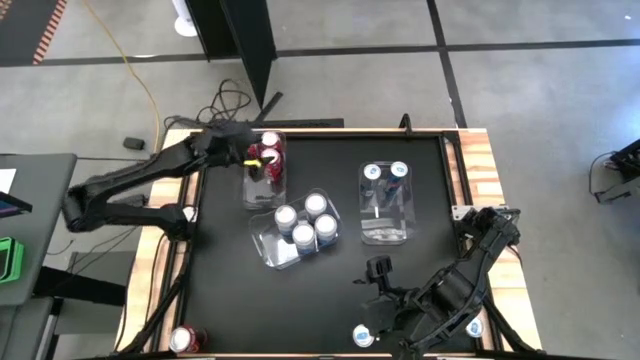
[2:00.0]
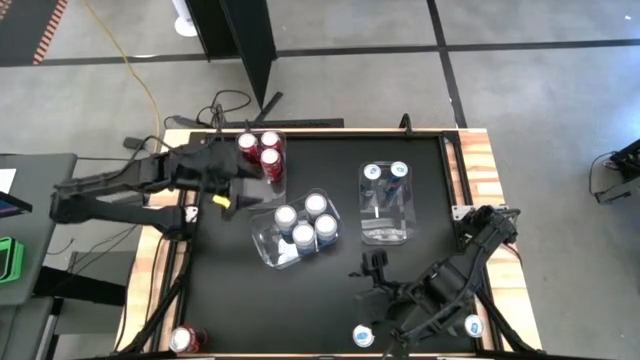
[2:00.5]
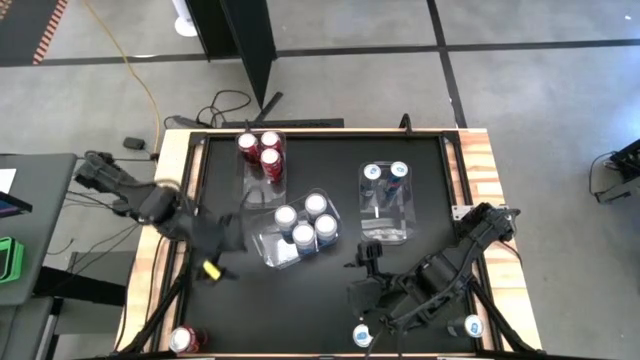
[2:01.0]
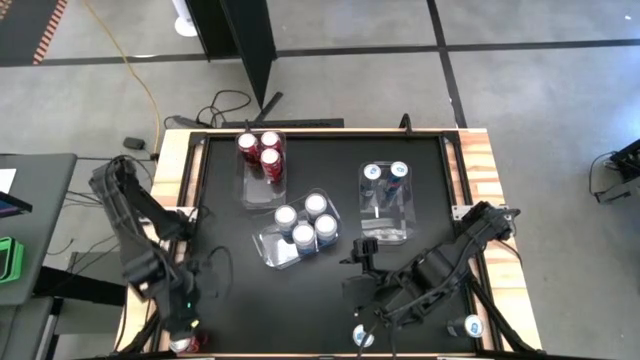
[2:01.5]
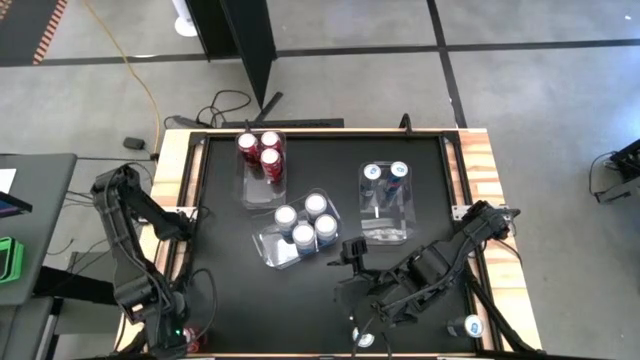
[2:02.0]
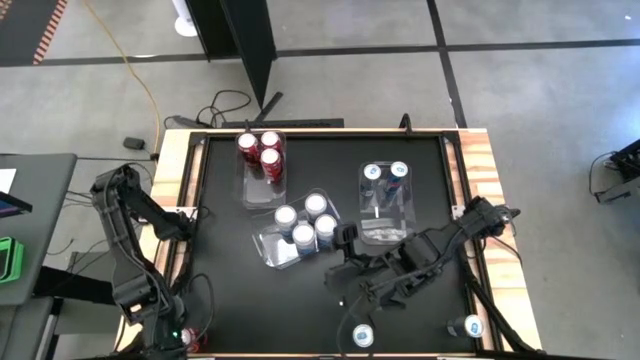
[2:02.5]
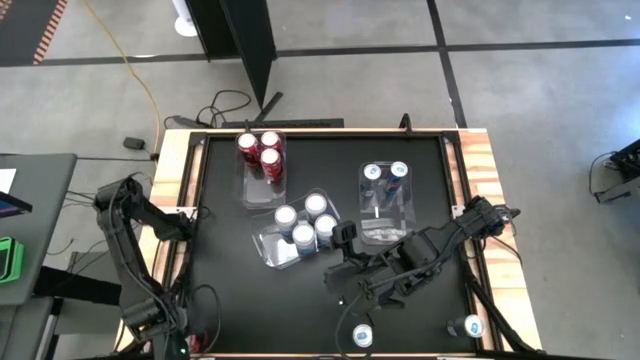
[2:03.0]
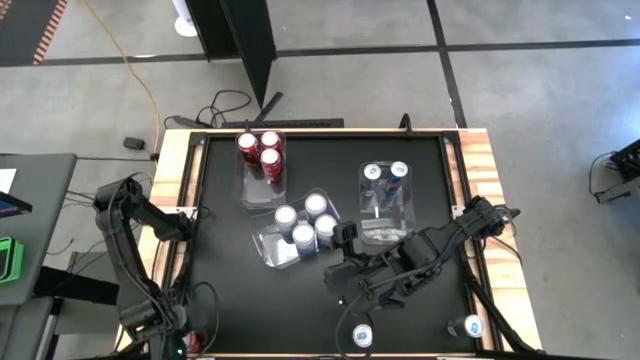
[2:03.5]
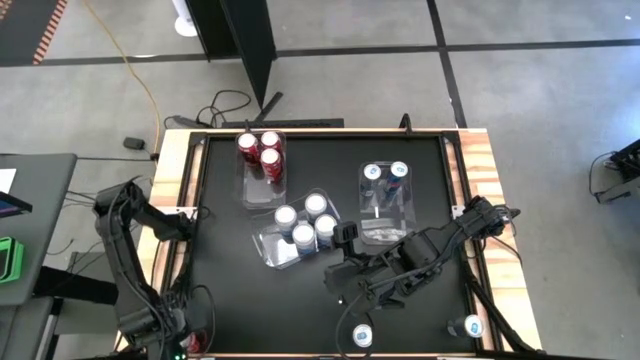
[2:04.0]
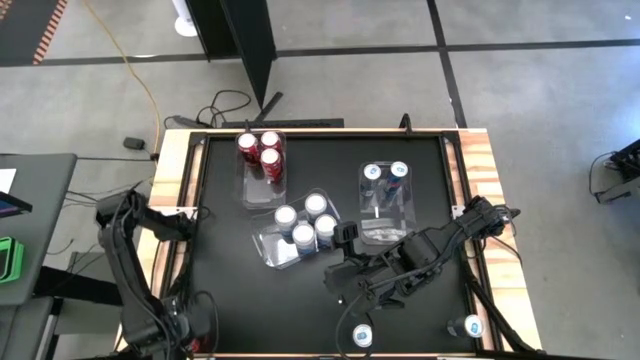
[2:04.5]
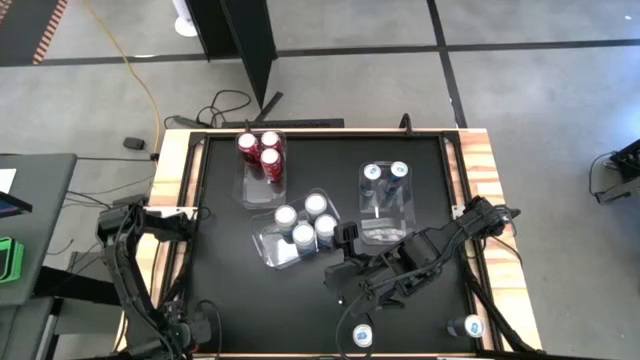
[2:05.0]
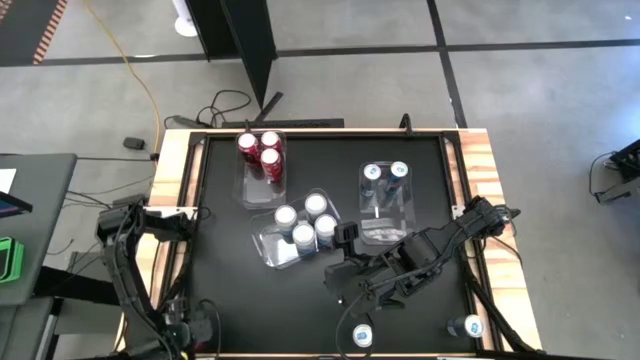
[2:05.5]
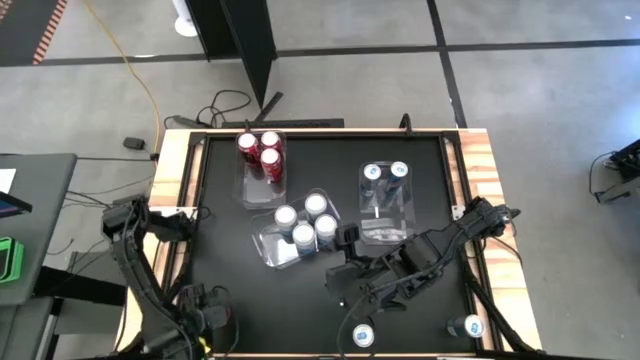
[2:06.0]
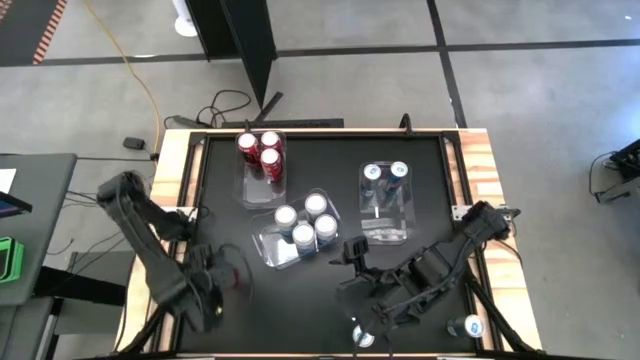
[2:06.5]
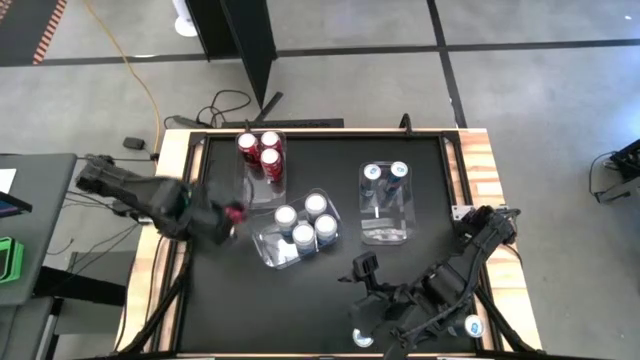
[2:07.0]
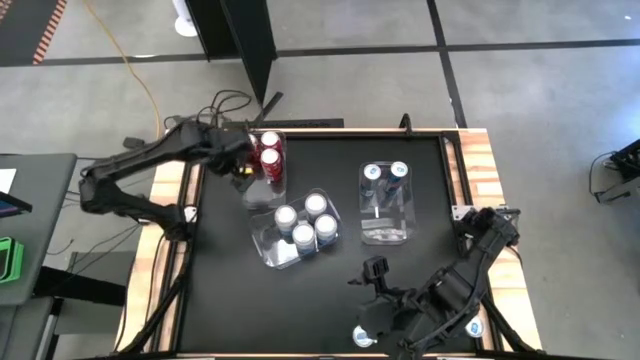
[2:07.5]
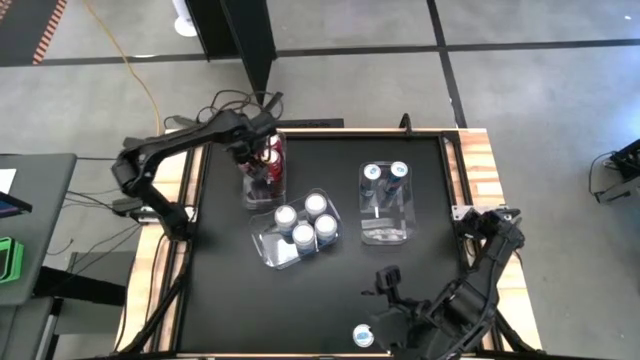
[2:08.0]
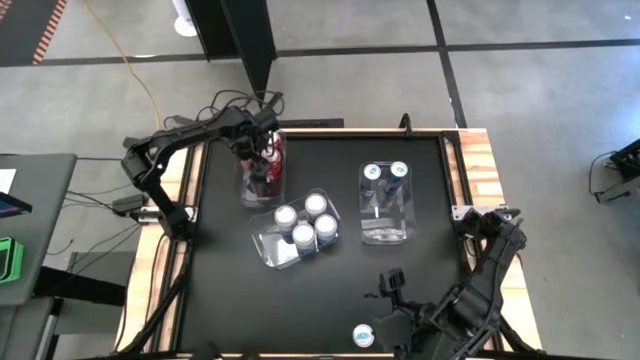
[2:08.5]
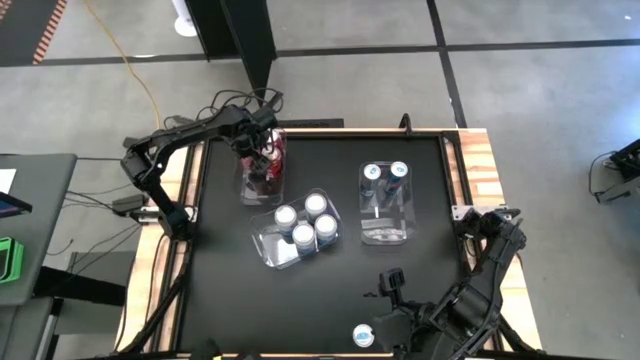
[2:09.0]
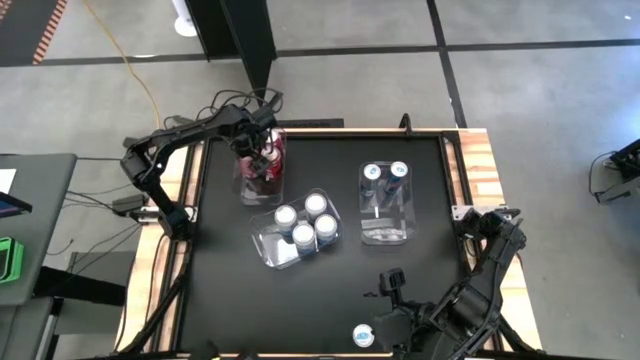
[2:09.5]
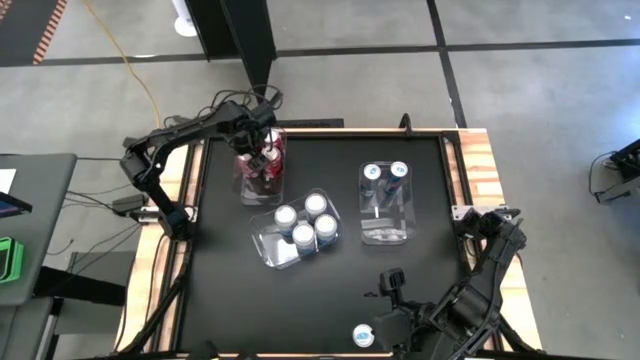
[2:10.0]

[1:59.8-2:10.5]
Task: Sort soda cans
Put the red soda can into the left transparent bin

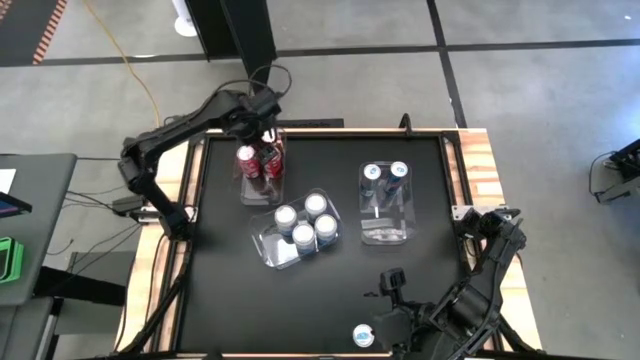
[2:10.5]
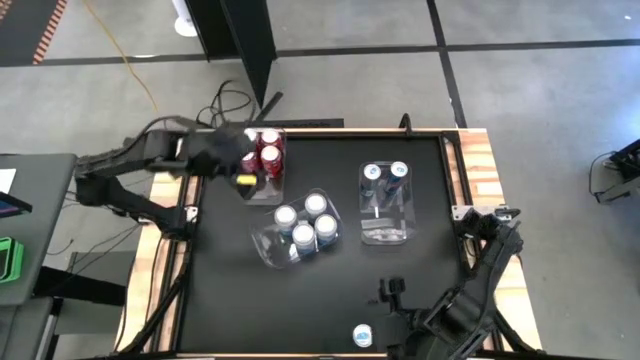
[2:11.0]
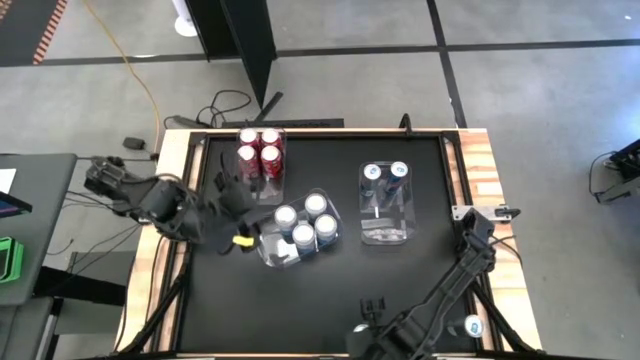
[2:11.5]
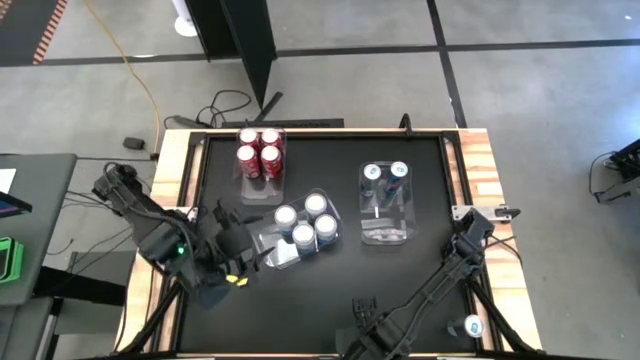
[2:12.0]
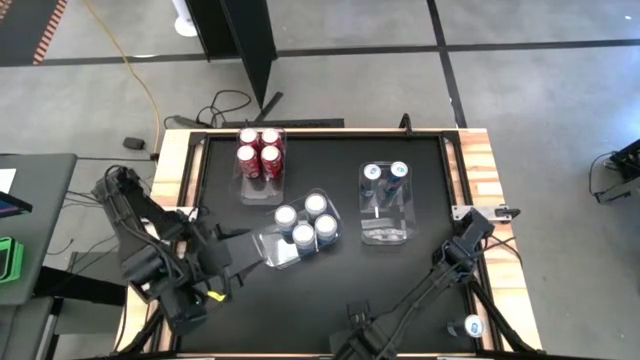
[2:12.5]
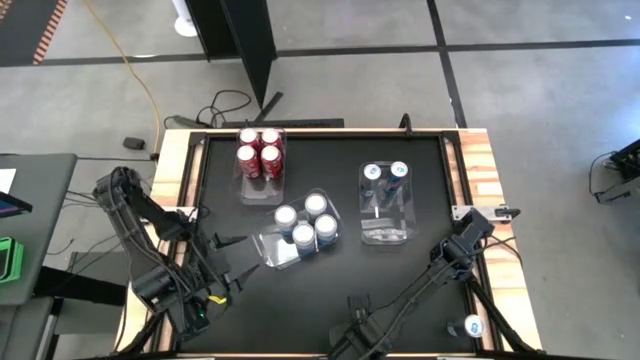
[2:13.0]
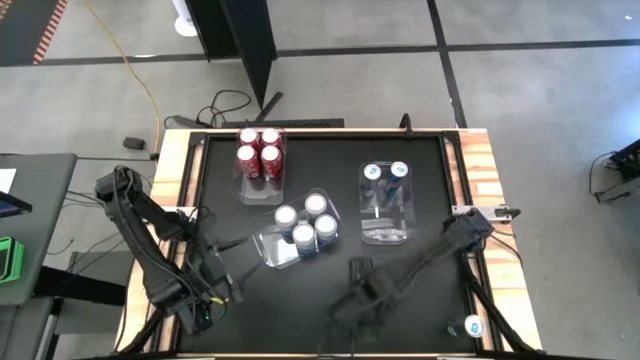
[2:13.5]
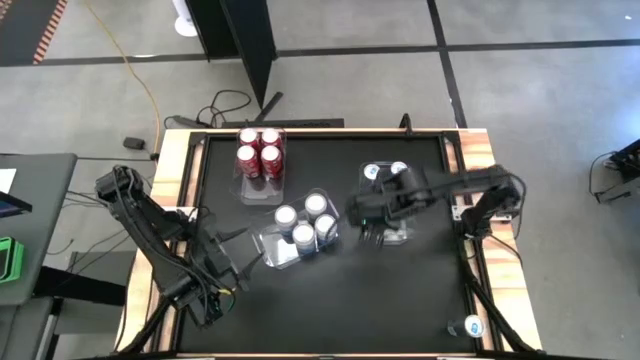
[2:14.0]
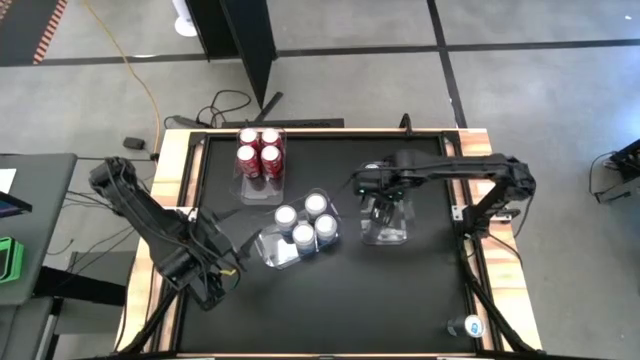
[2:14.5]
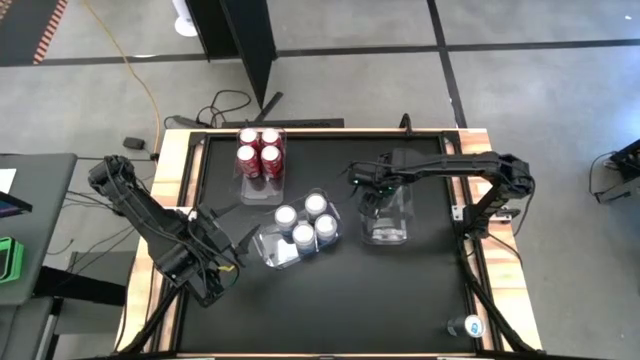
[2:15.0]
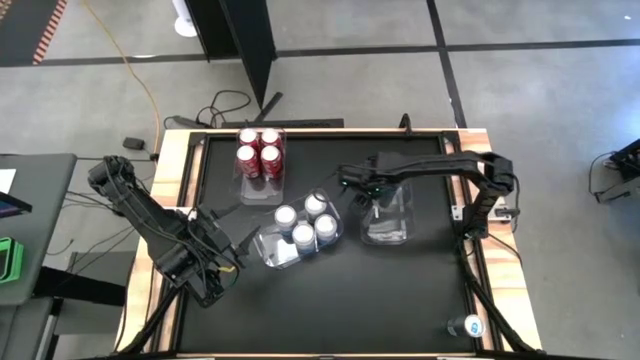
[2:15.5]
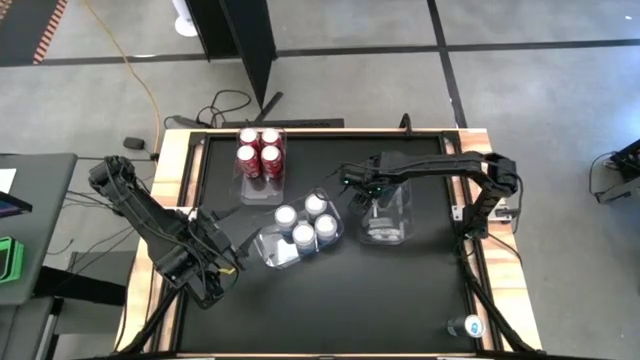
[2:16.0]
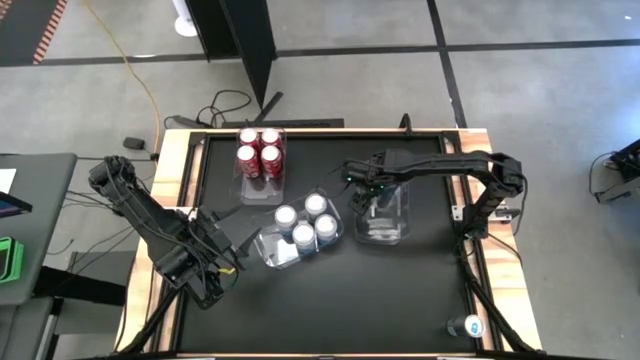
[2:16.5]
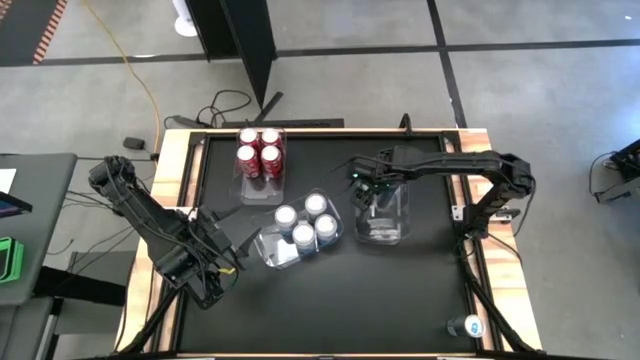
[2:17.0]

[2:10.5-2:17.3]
Put the left blue soda can into the right transparent bin

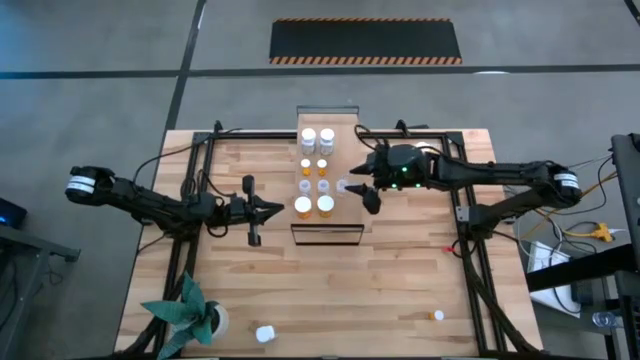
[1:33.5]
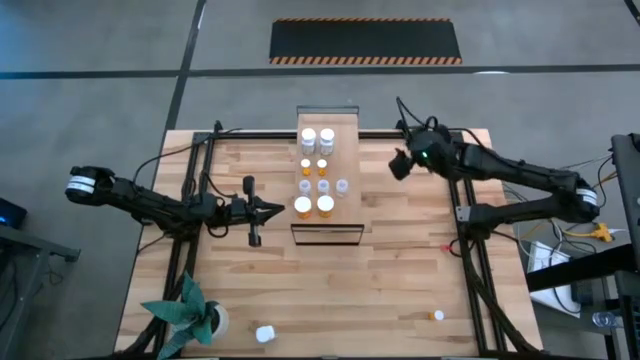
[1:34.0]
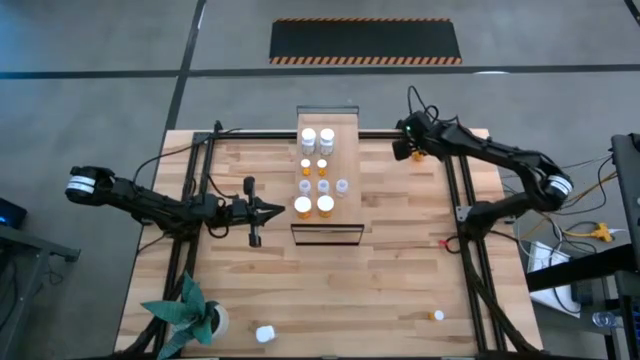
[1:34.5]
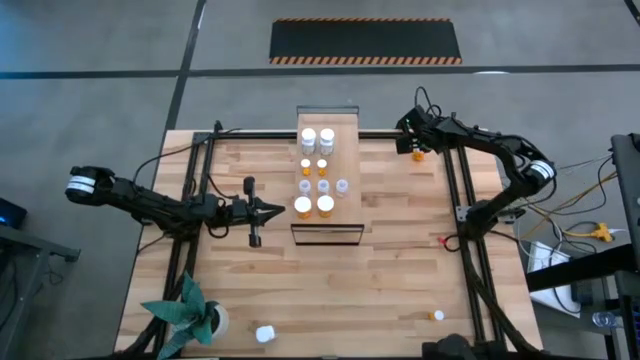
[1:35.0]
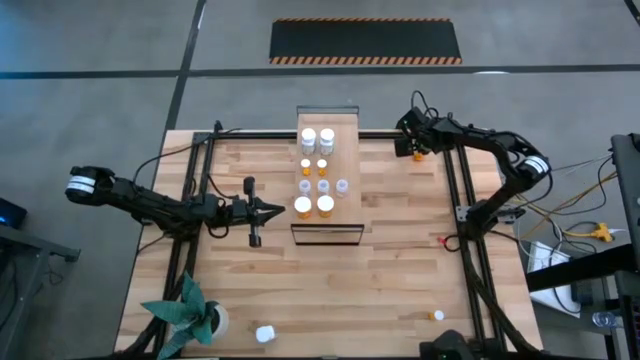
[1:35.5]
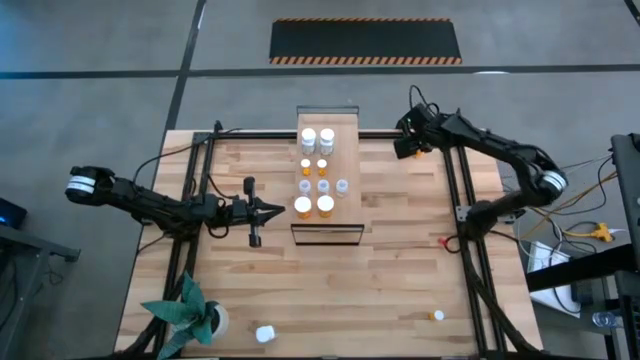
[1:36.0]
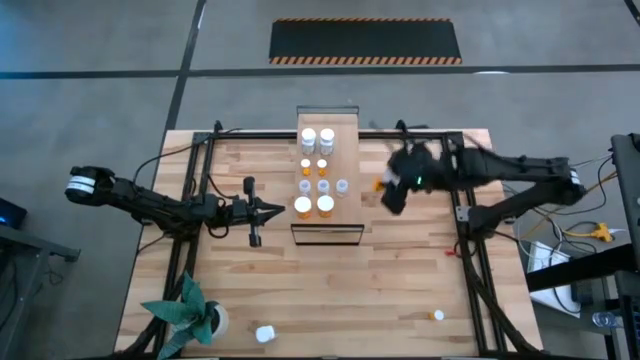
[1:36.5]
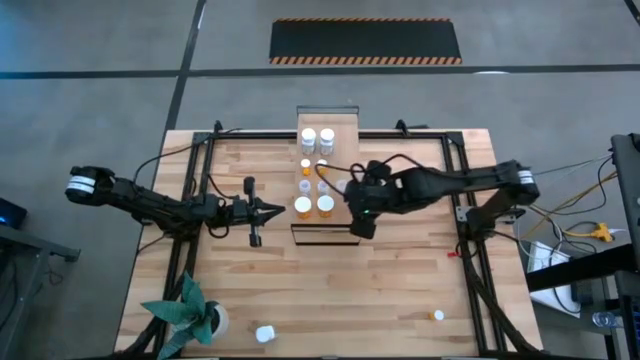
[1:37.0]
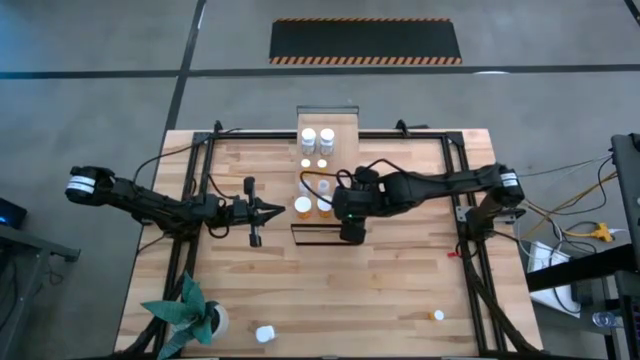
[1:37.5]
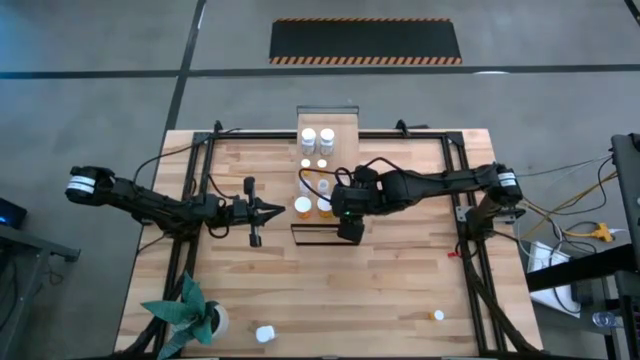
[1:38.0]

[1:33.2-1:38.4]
Task: Pick and place medicine bottles onto shelf by color
Put the big orange pill bottle aligned with the other big orange pill bottles on the shelf
